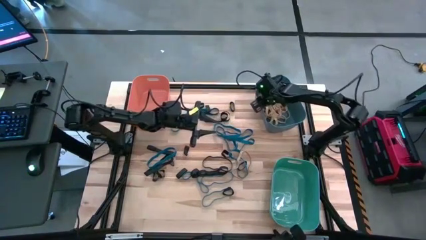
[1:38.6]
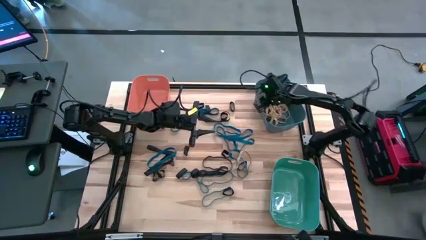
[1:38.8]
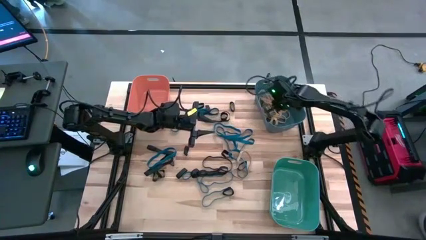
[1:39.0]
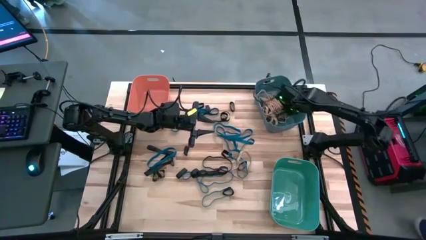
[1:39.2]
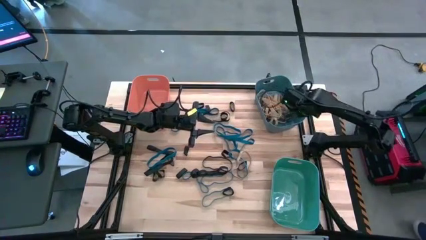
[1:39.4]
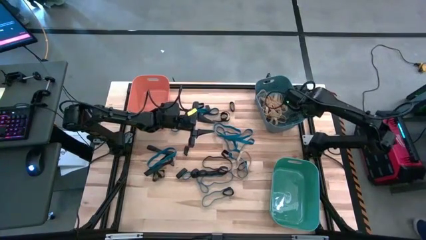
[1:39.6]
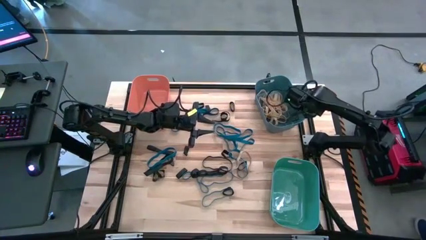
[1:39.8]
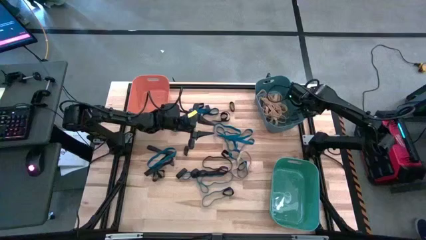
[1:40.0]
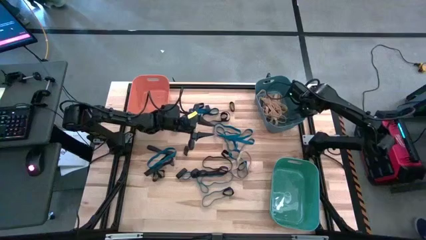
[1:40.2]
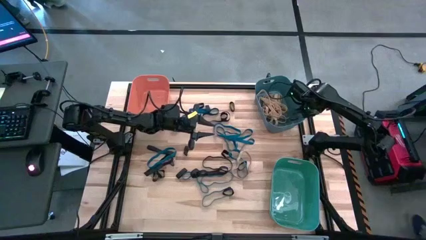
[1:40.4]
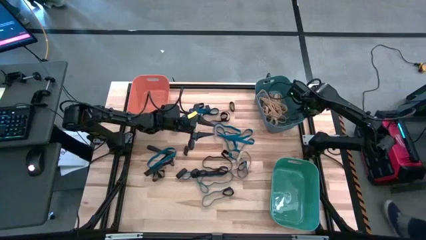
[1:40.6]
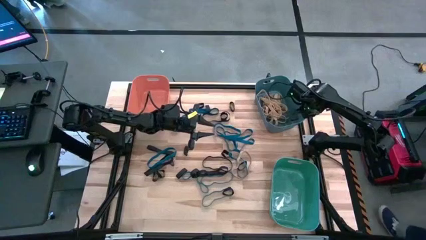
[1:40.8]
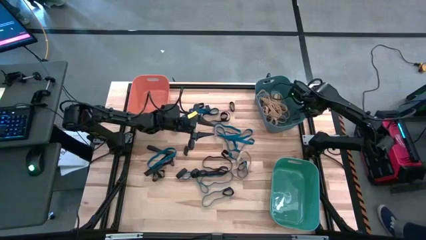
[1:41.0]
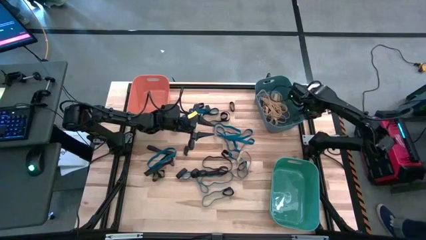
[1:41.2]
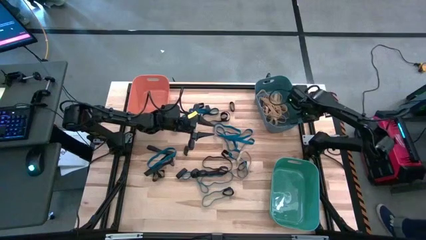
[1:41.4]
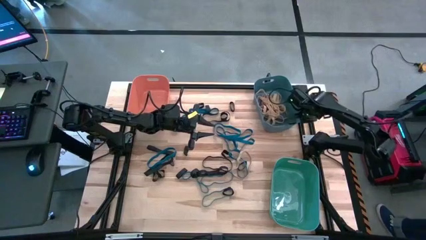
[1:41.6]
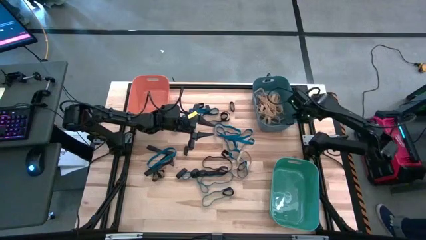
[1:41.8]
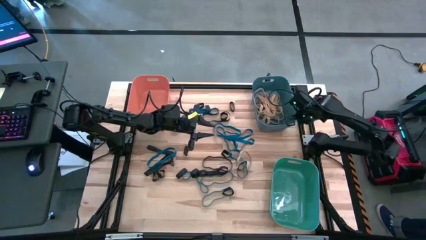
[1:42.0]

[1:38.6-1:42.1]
Task: Sort rubber bands into baskets
Adjust the blue bin on the table

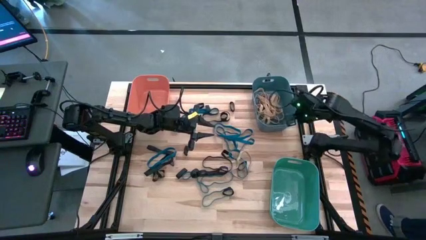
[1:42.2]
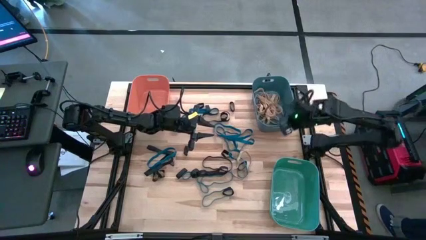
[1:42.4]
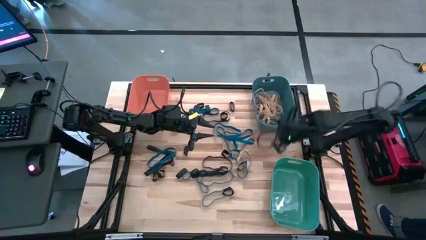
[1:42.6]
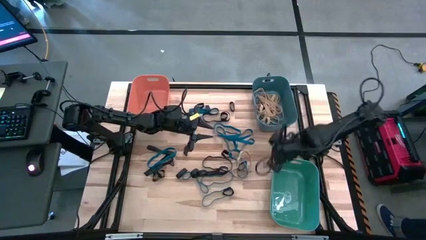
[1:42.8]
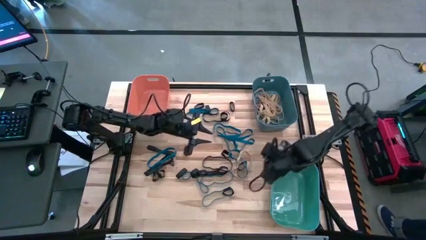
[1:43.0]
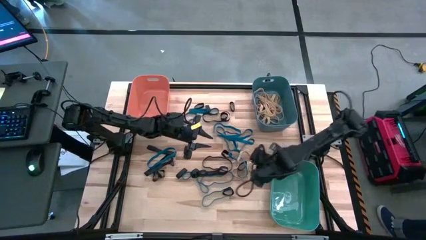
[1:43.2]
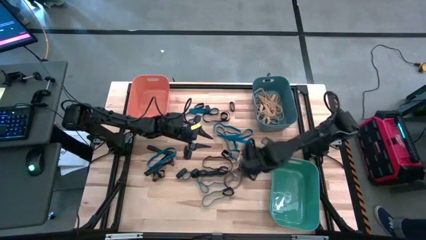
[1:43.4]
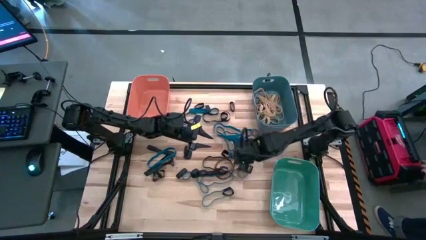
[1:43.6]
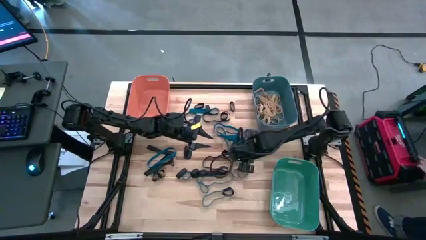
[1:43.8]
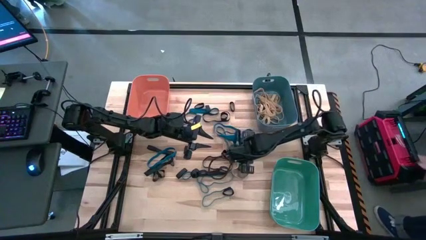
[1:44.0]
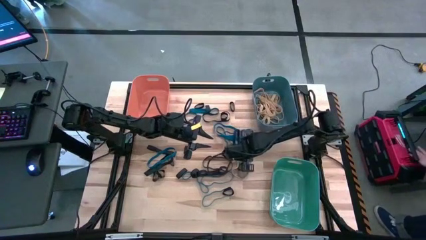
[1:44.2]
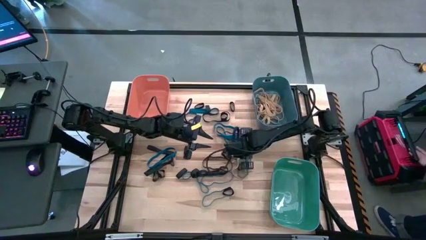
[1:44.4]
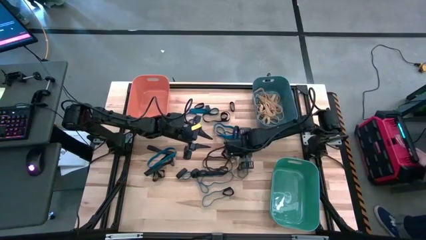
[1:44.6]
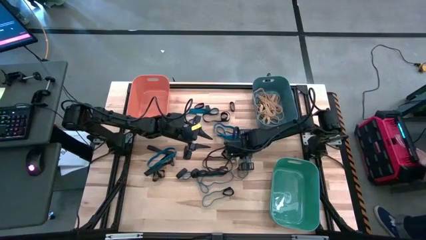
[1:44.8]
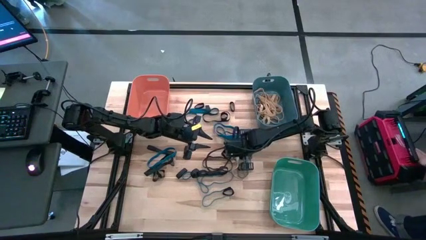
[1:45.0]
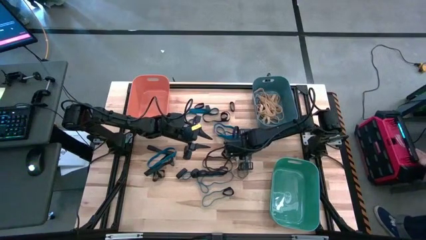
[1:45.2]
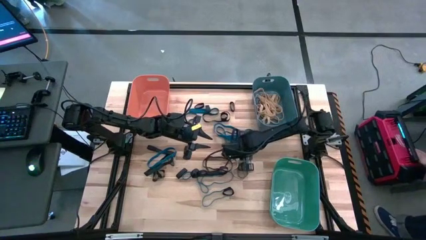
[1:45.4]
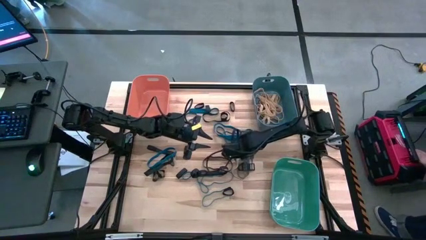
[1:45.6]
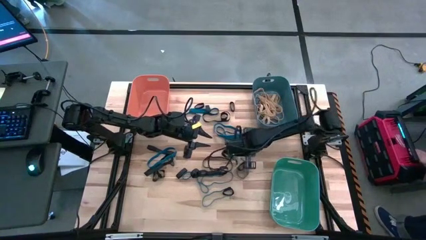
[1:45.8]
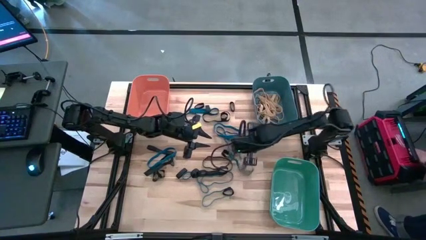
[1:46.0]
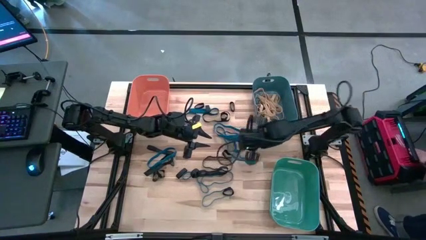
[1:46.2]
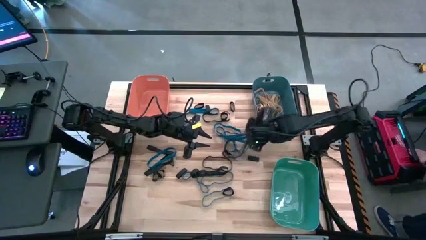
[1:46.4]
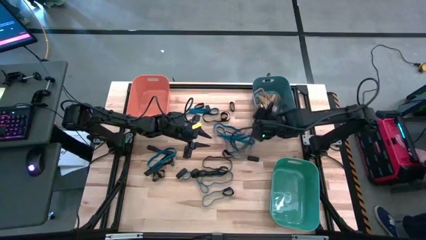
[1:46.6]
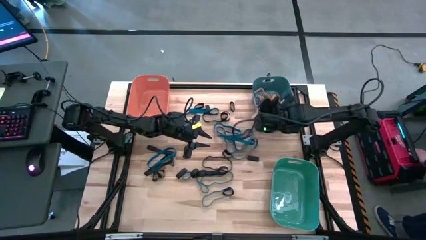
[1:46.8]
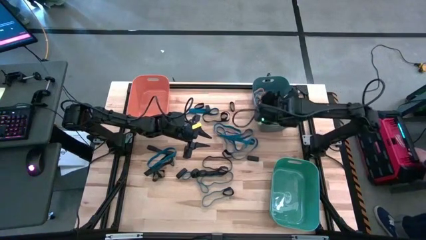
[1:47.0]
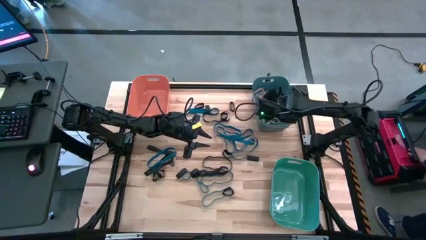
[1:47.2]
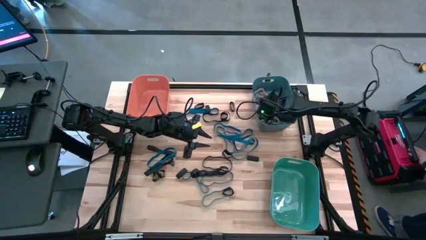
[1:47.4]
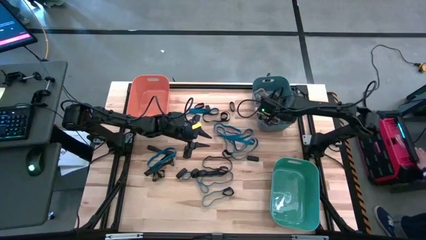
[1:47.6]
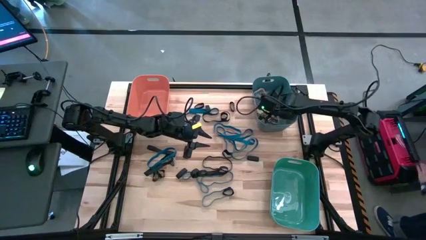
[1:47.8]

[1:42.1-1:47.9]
Put the white rubber band into the blue bin

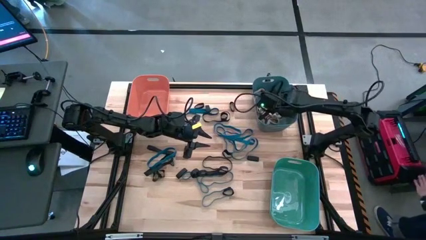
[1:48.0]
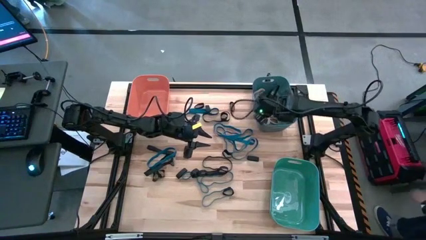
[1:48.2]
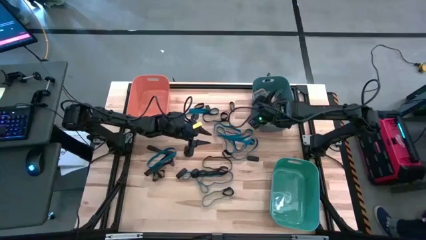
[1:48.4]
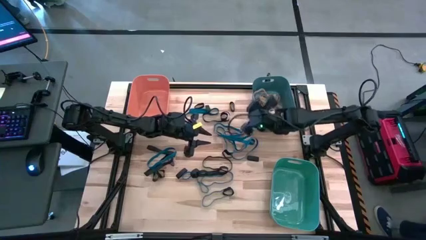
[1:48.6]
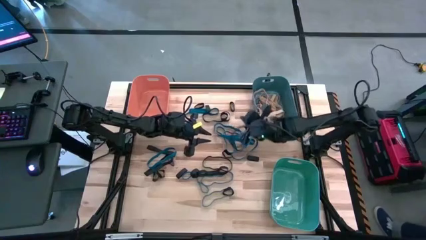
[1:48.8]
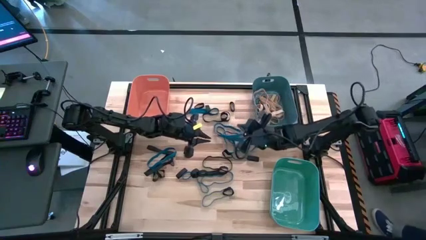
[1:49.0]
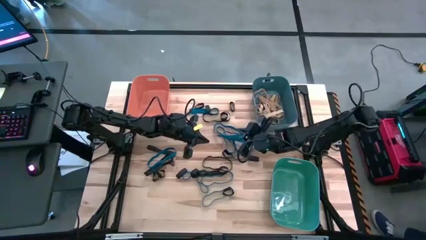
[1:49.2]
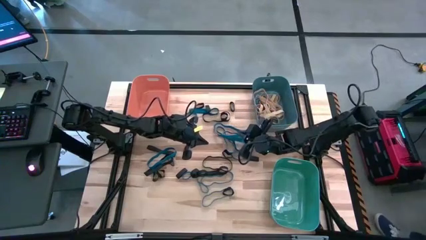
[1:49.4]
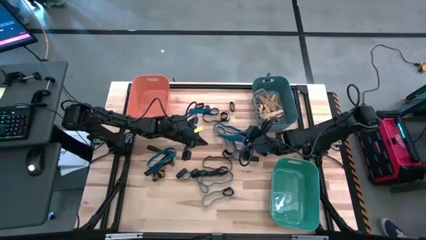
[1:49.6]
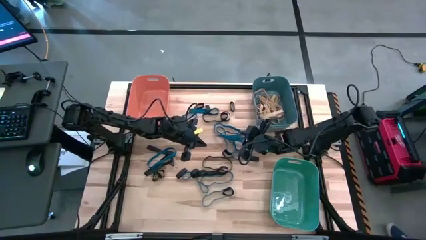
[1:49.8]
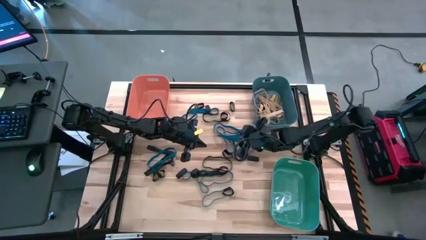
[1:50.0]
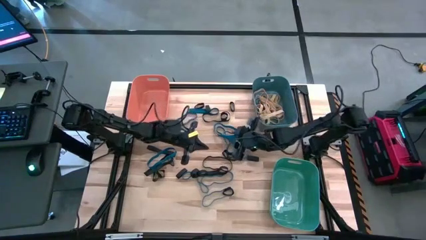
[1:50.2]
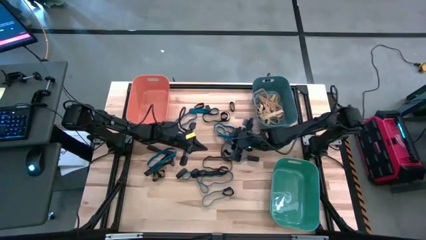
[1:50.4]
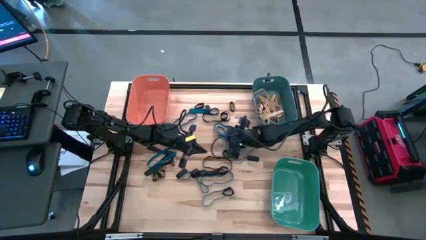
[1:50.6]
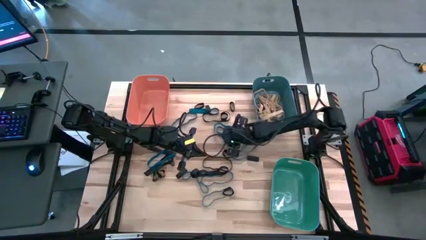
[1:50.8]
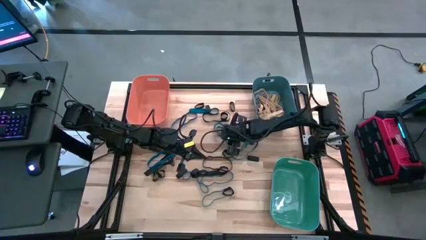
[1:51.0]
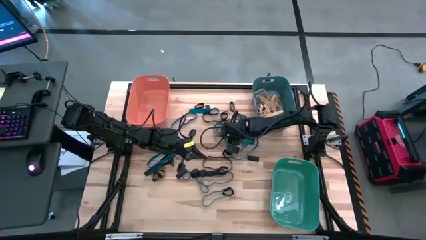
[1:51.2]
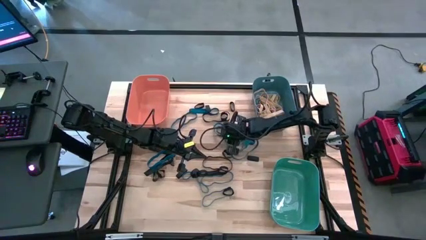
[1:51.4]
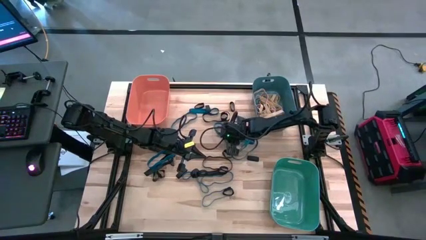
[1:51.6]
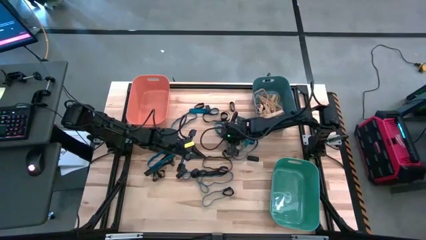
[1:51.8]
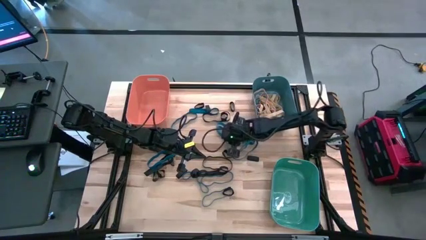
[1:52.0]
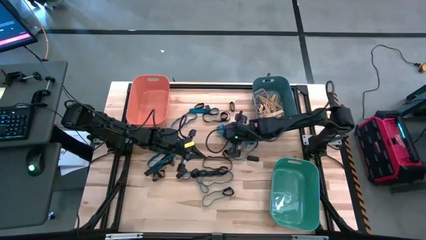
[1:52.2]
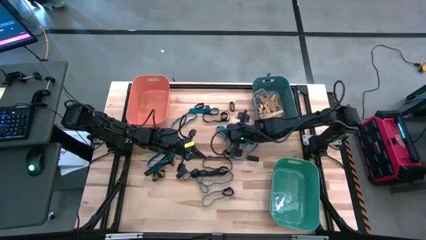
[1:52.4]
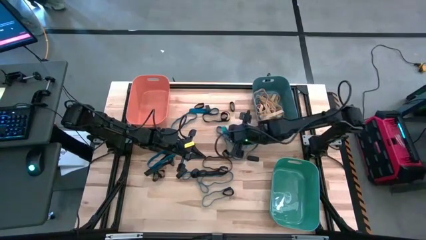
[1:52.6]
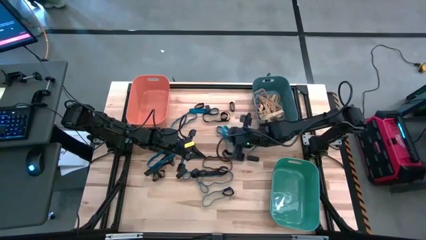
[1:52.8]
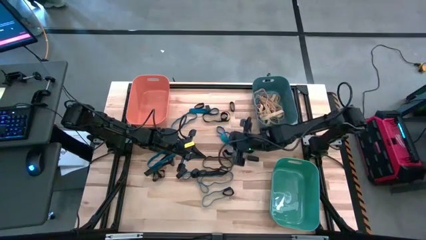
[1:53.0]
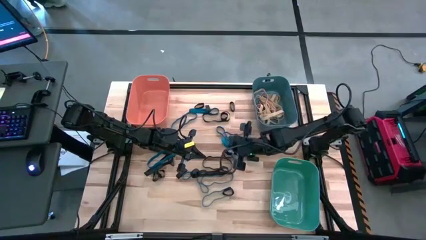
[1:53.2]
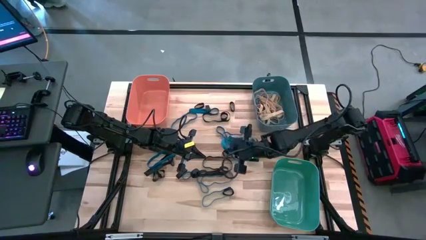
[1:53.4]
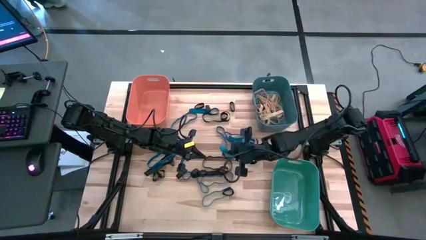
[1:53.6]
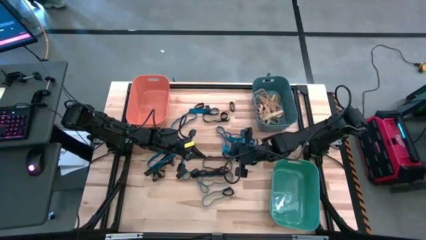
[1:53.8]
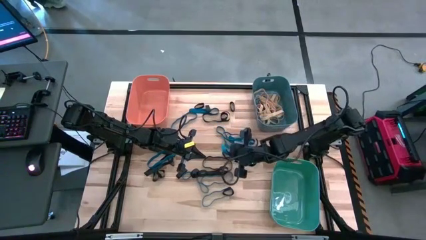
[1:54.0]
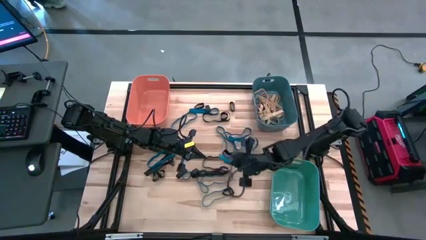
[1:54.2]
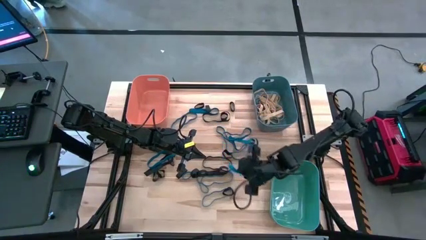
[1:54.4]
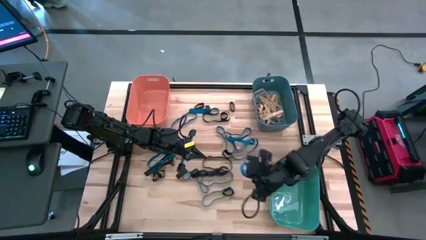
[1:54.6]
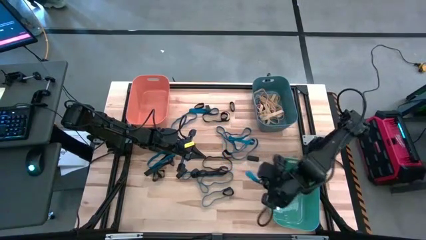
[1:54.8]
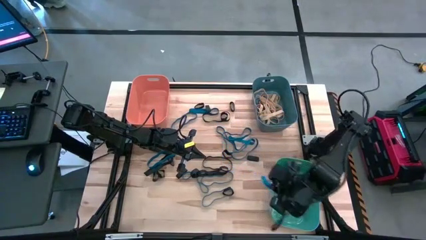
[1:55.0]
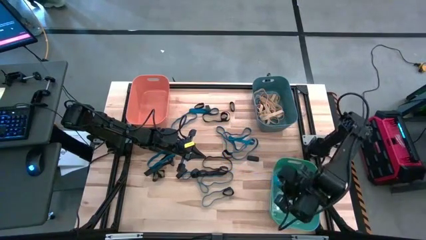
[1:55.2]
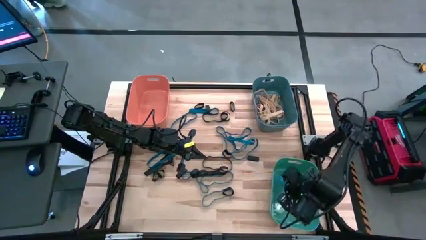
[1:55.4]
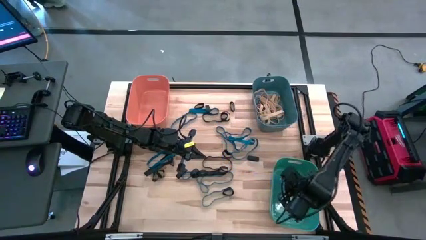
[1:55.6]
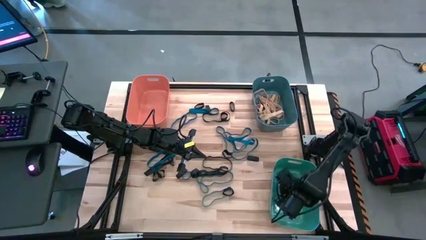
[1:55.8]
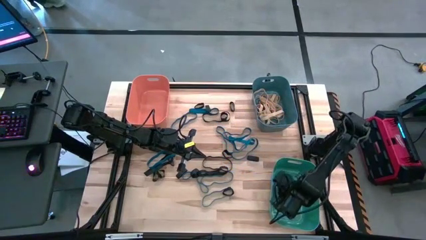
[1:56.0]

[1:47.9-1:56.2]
Put the blue rubber band into the green bin

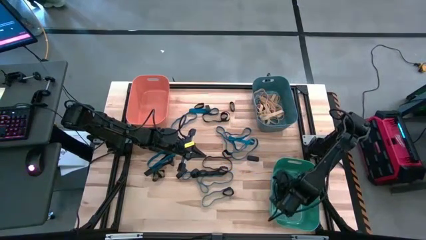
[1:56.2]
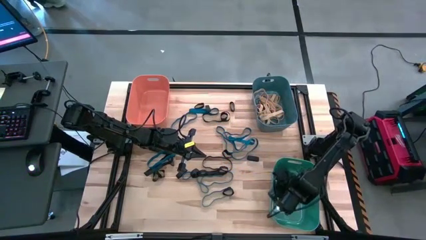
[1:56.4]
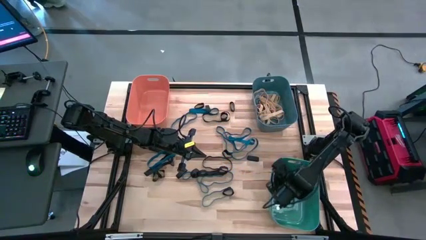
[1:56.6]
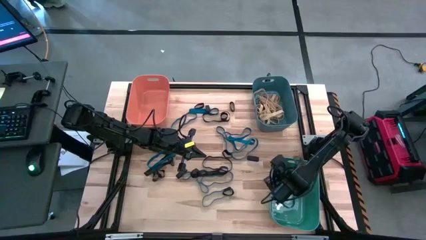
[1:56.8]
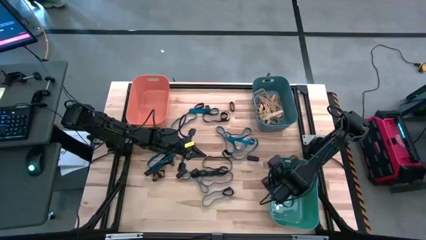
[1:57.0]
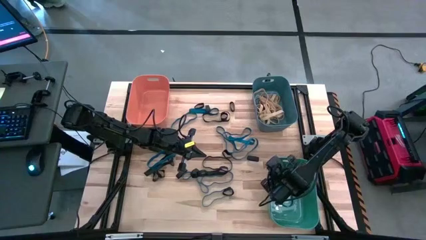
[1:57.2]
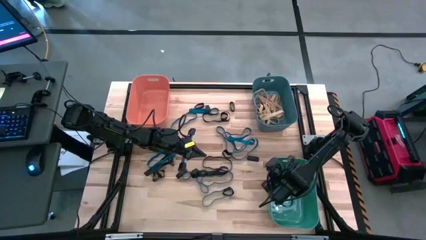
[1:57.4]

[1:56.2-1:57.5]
Adjust the green bin on the table
